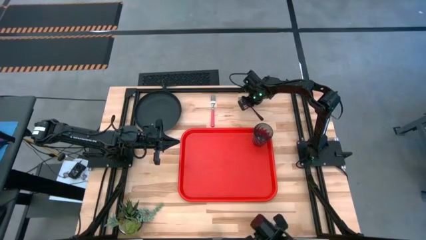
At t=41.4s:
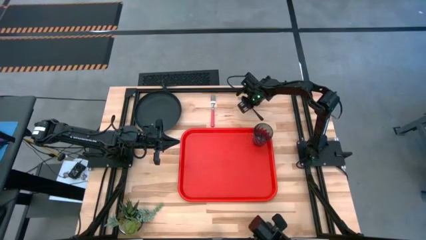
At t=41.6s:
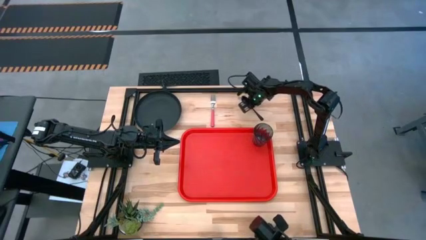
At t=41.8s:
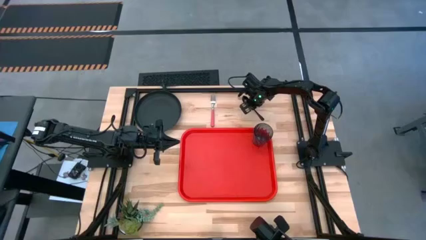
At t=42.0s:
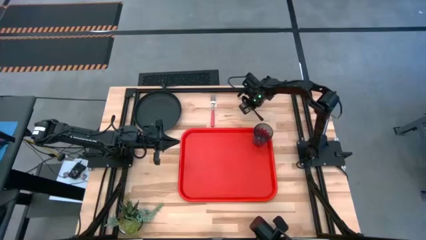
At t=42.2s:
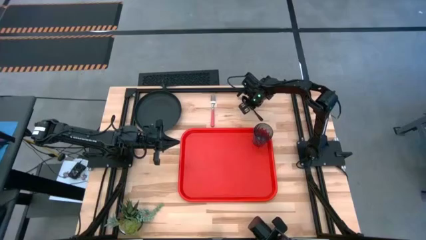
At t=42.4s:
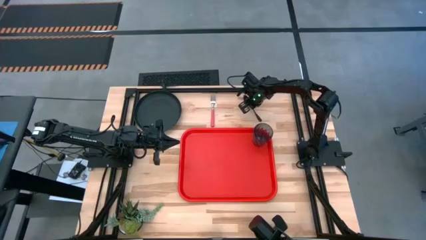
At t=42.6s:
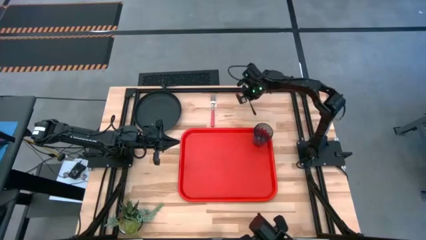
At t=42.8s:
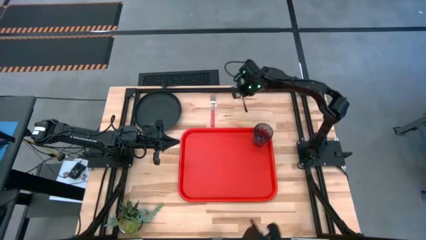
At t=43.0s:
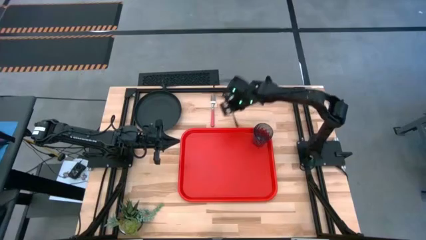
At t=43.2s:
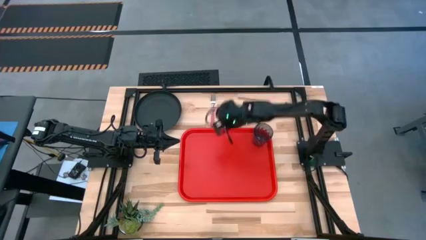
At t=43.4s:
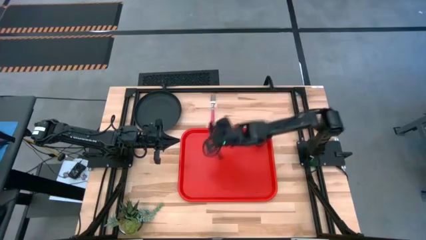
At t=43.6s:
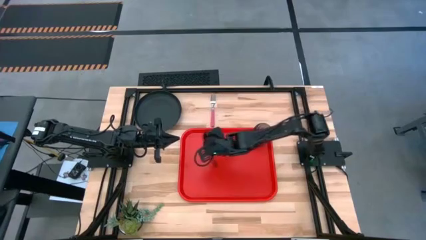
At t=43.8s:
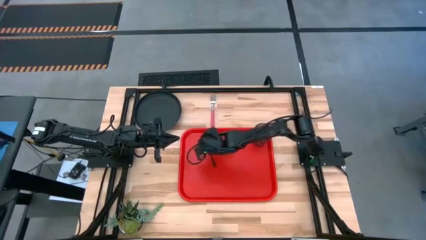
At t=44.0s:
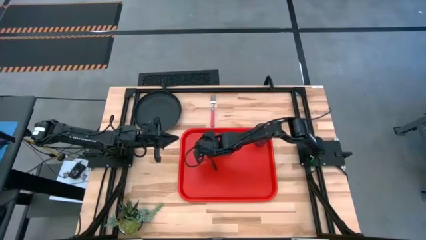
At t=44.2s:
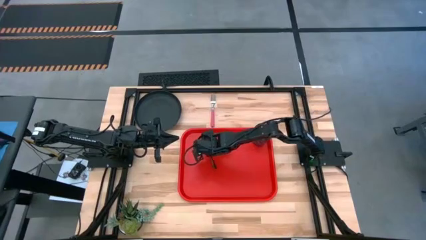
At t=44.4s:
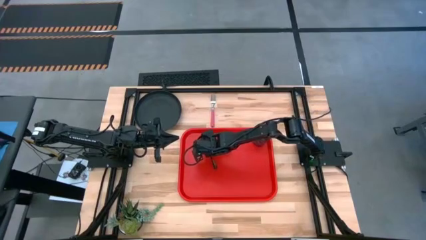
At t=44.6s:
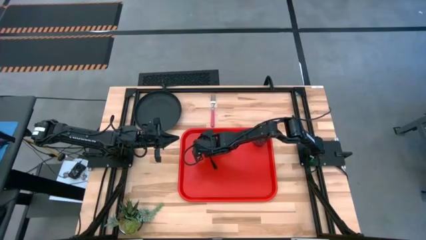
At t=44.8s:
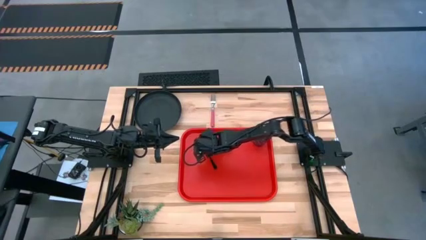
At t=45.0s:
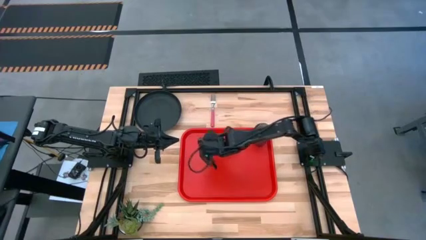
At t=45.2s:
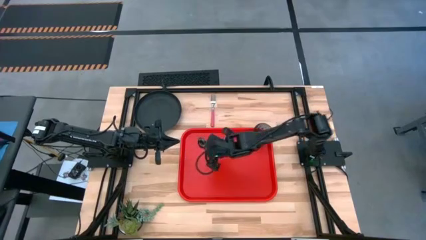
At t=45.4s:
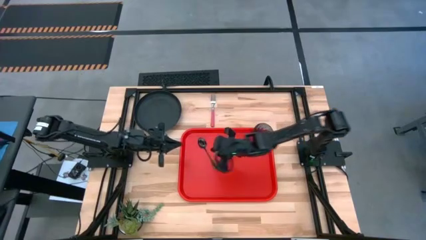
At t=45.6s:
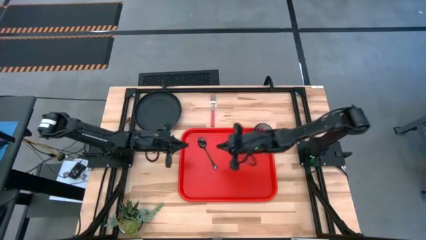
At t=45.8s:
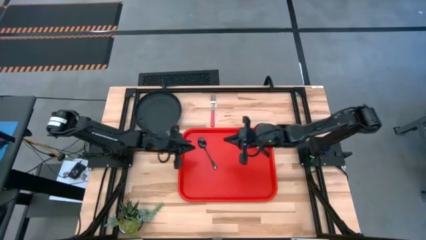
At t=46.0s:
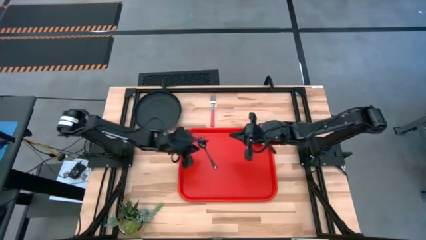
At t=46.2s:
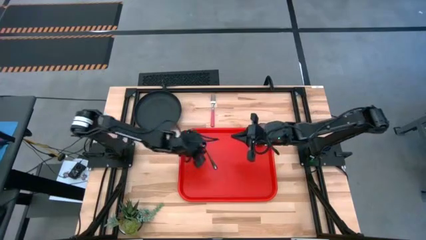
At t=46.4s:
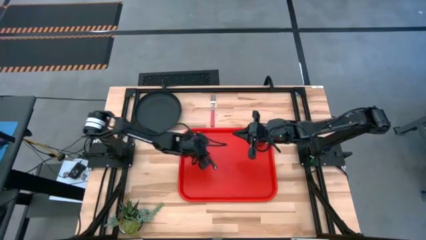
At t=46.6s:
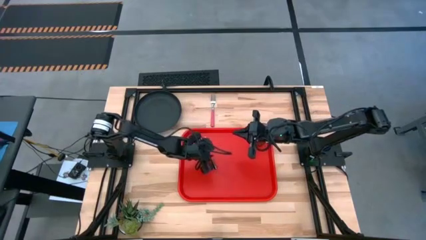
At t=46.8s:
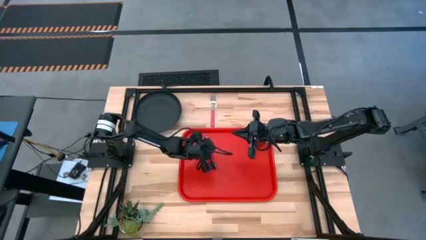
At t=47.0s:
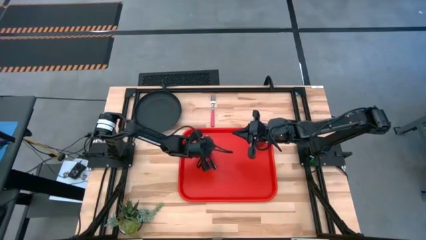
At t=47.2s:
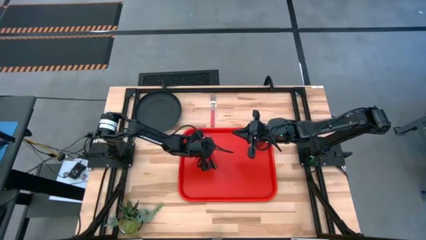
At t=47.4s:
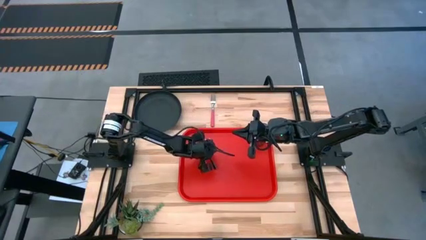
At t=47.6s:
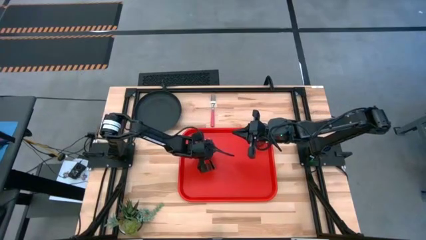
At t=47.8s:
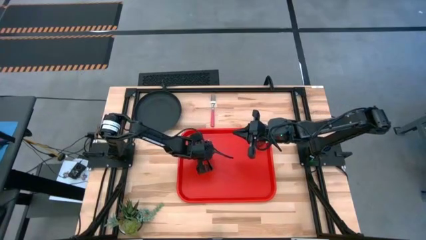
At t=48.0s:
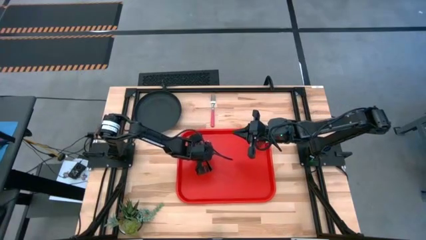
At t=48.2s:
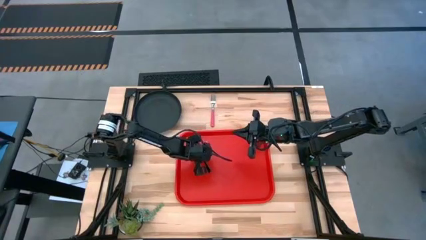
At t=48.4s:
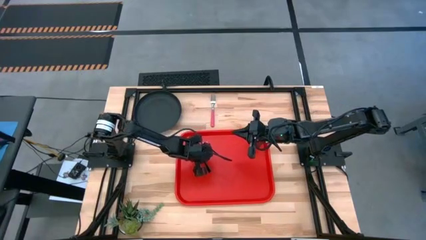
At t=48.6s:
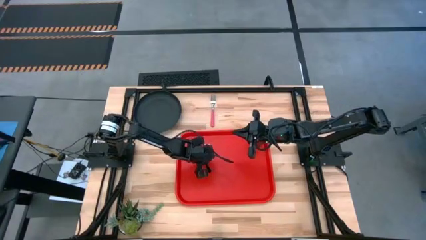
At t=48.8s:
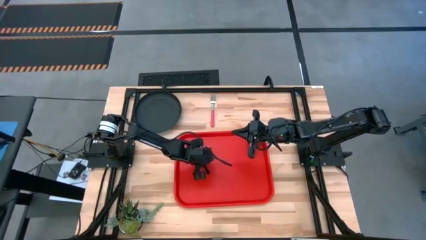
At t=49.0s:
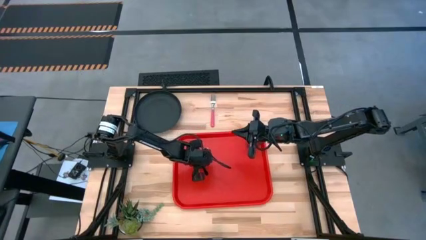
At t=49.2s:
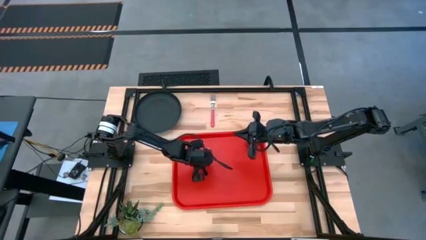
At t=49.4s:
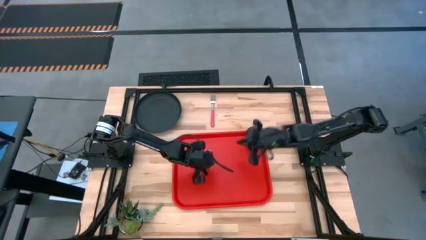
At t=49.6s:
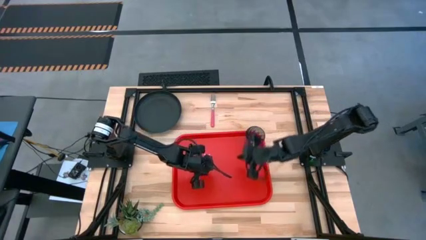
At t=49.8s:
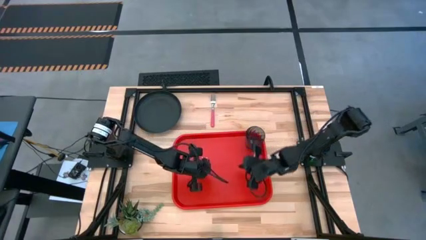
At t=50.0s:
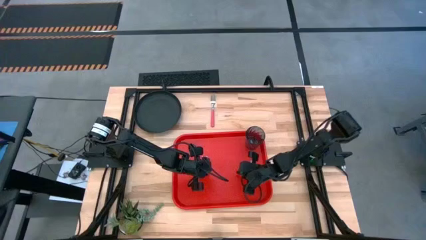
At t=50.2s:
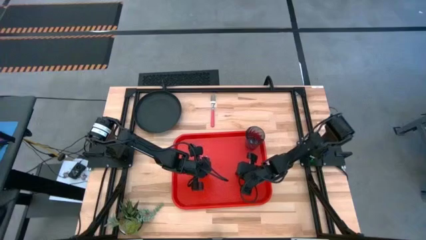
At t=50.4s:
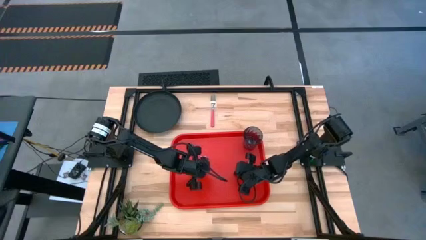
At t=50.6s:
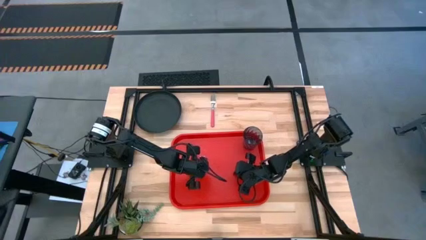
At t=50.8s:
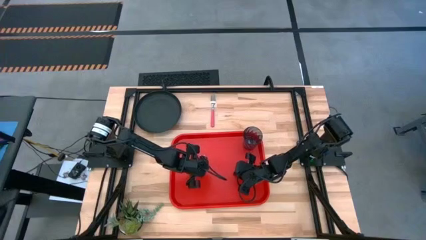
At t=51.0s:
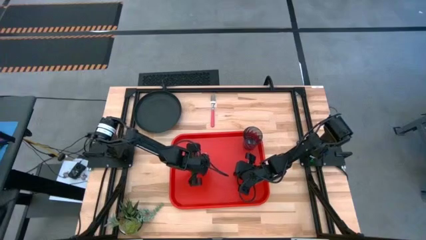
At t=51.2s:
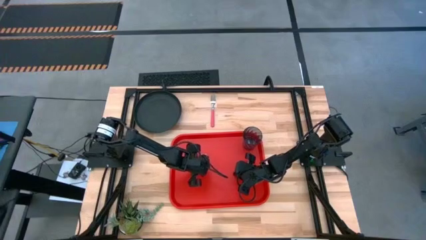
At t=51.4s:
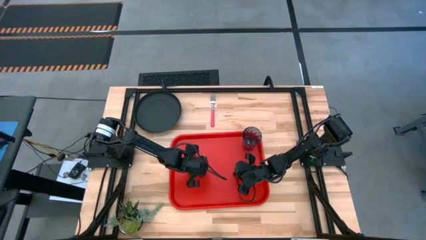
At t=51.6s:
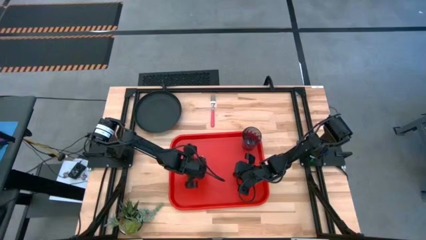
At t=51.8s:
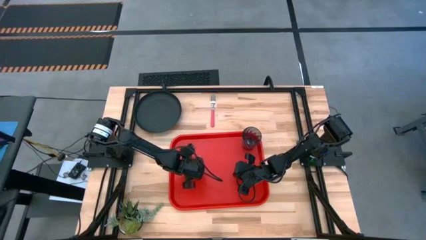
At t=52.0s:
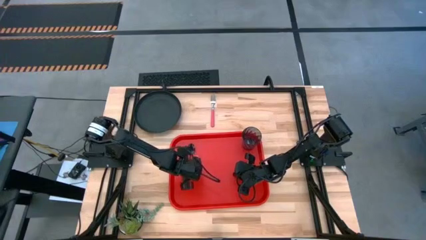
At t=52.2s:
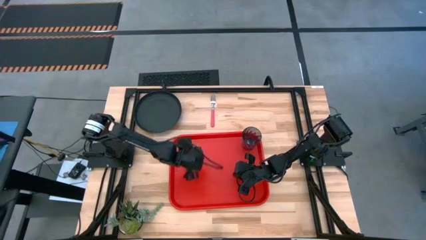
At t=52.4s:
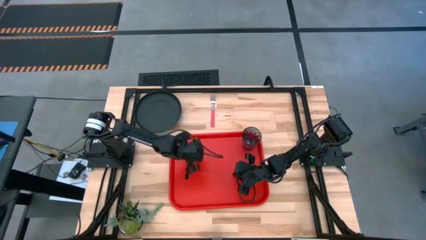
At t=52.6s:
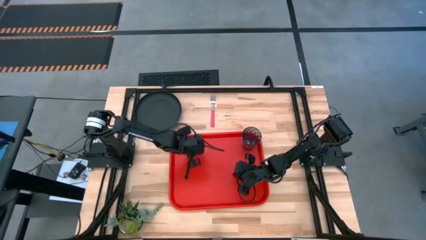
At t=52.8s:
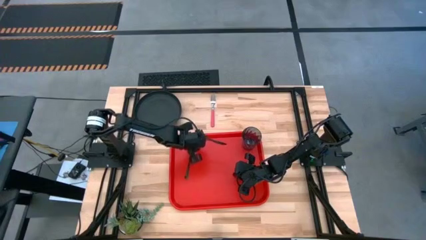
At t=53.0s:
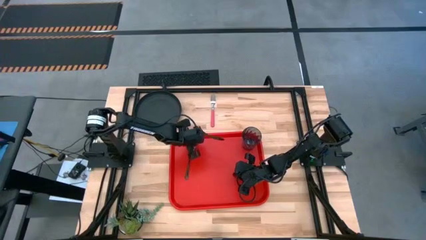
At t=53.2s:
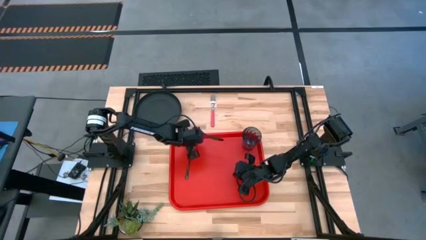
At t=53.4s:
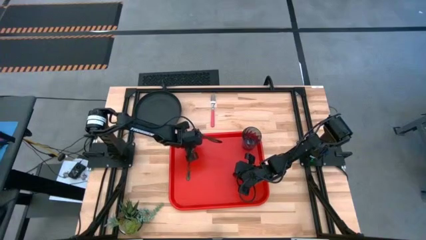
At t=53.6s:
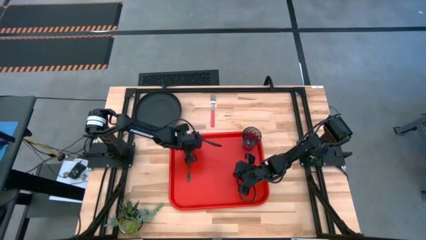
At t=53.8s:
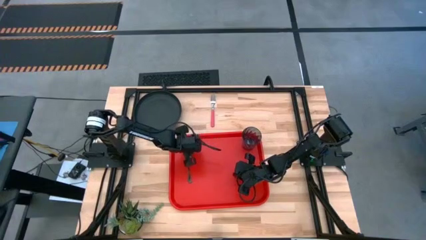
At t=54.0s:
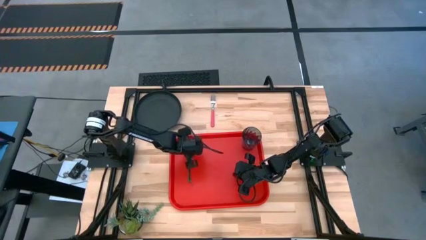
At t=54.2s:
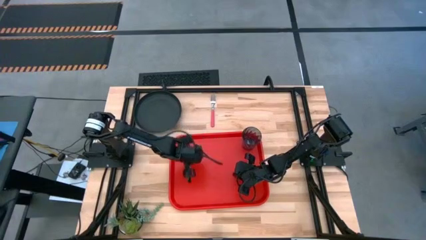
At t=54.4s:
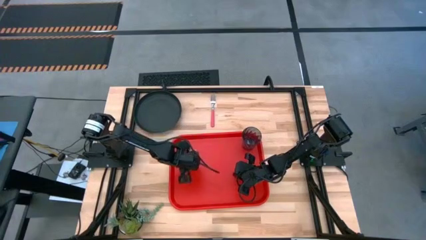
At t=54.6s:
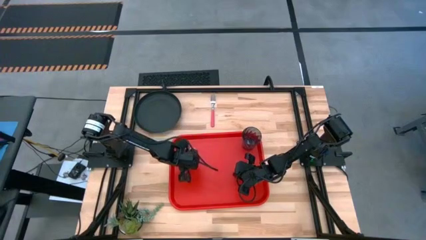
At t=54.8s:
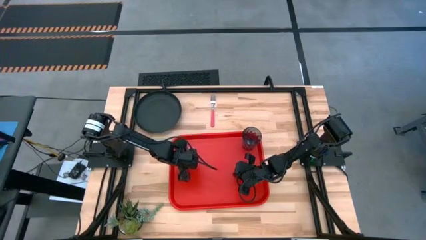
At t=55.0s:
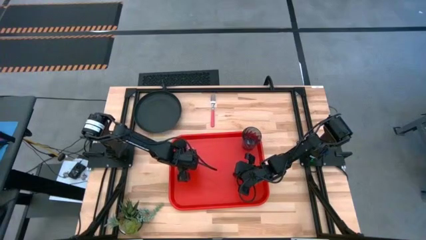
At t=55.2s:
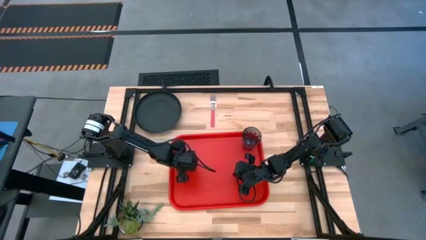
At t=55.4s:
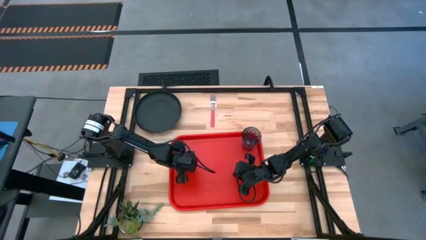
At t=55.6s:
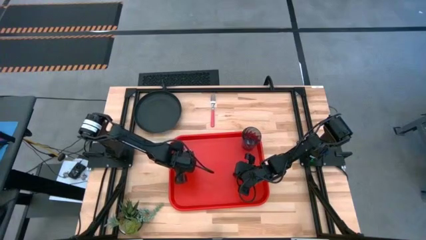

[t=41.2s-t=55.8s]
Task: Pick and place plate/cup/fork/spoon on tray
Put the black spoon to the left of the red serving tray

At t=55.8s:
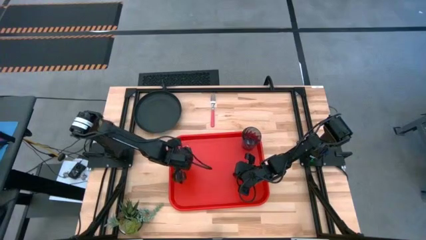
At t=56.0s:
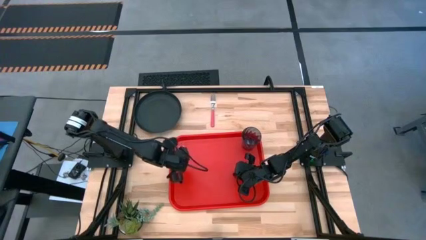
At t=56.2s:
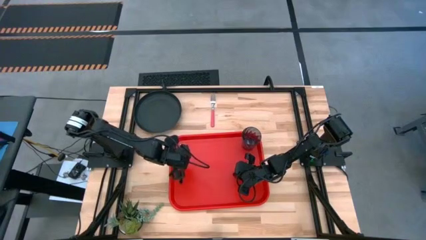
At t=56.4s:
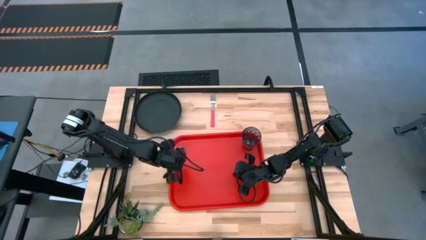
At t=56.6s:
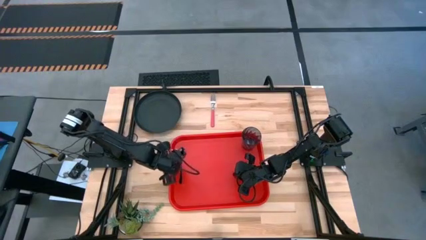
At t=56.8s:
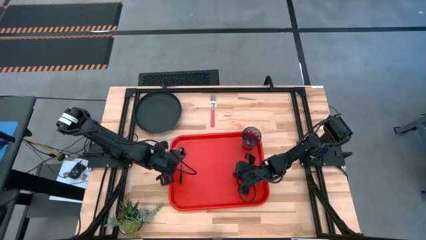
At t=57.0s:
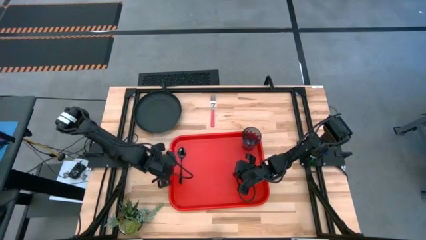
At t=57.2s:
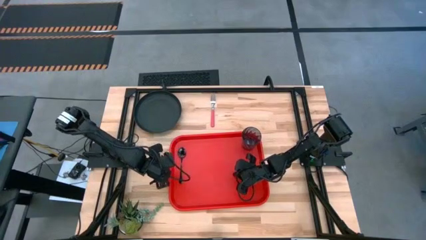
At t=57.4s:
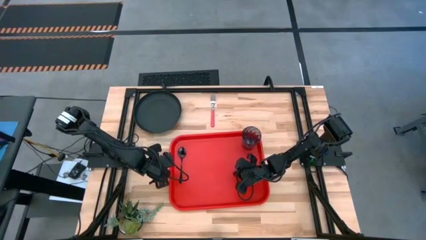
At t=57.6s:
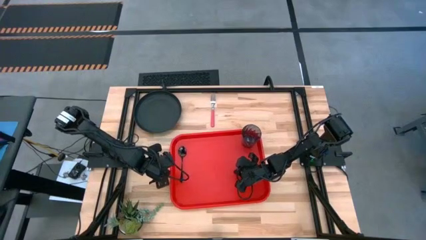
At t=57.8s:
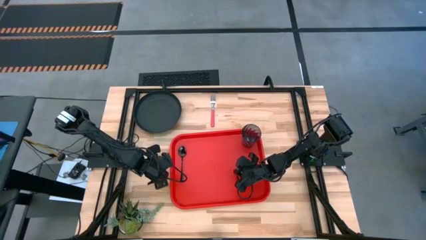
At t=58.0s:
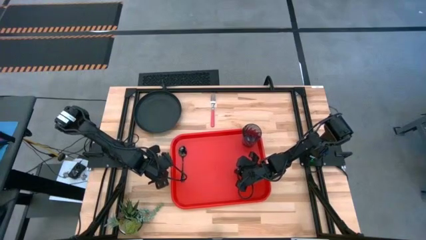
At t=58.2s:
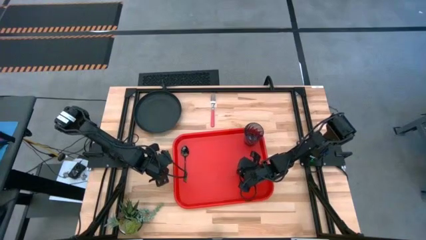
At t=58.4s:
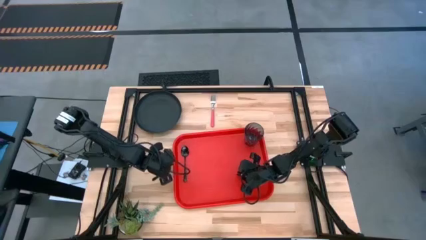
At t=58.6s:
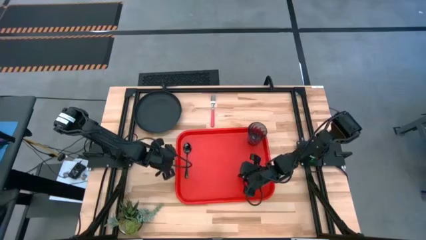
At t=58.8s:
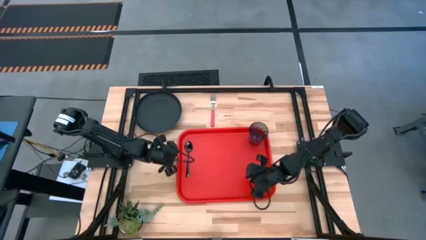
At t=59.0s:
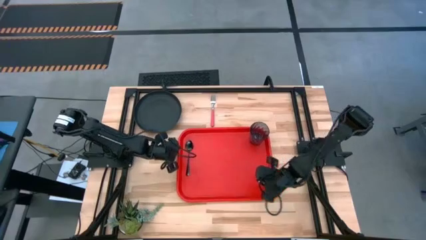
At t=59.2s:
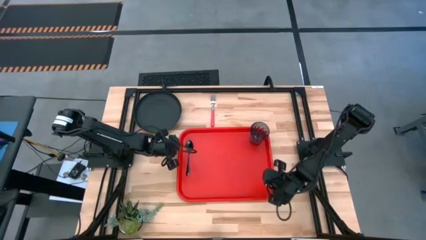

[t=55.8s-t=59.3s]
Adjust the red serving tray on the table
